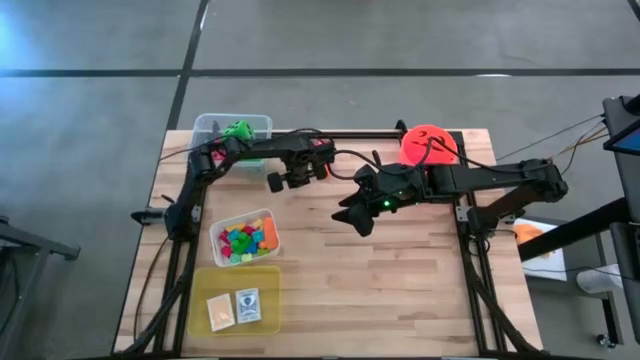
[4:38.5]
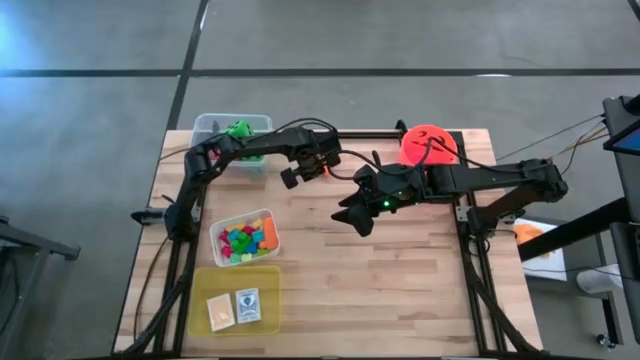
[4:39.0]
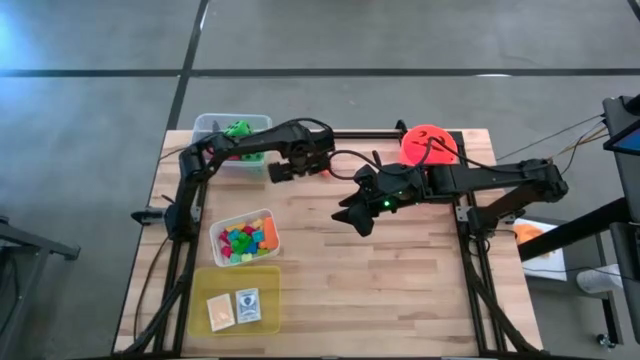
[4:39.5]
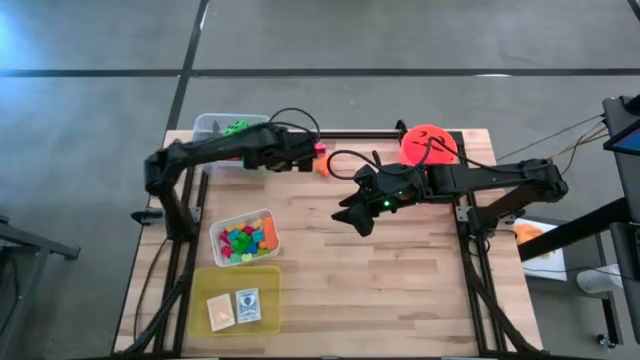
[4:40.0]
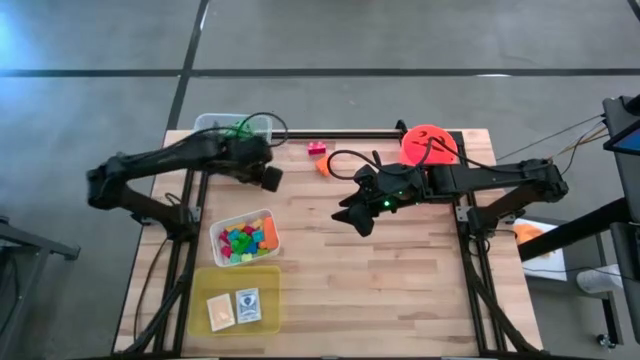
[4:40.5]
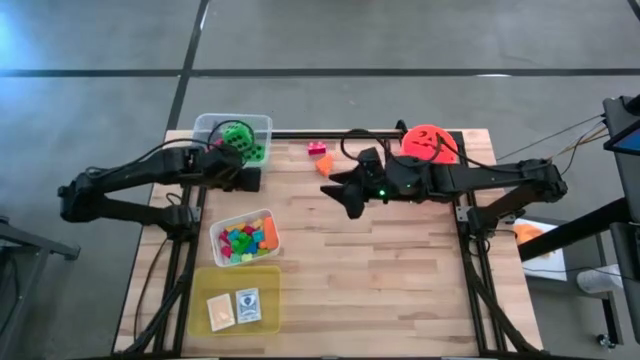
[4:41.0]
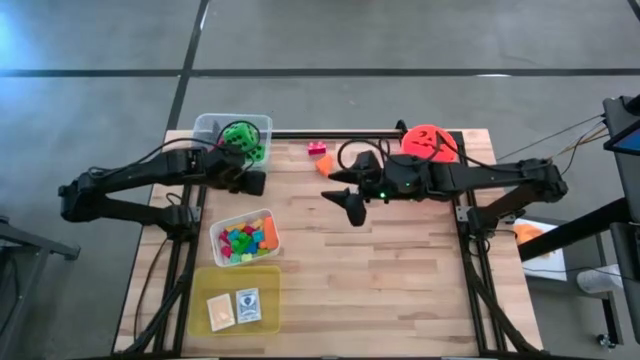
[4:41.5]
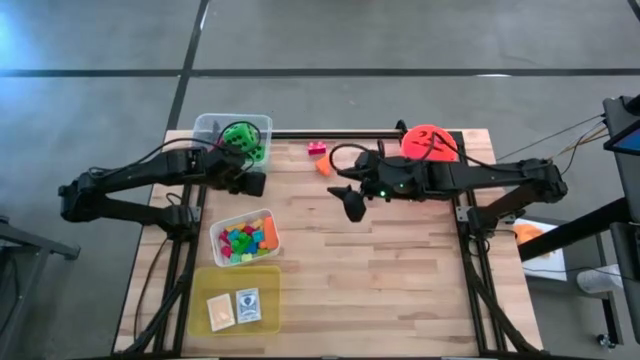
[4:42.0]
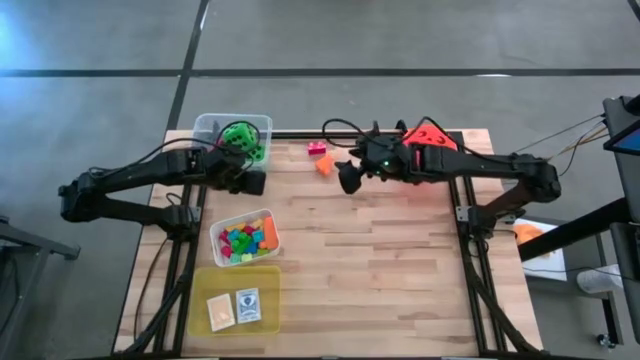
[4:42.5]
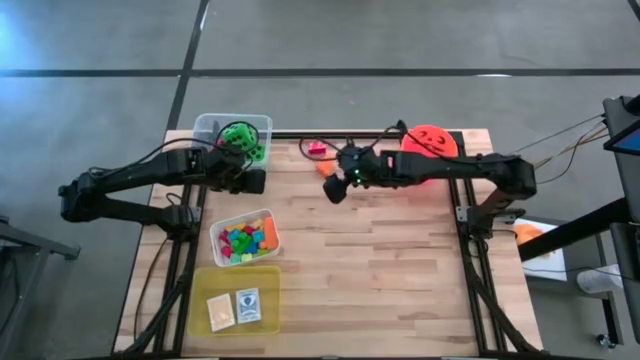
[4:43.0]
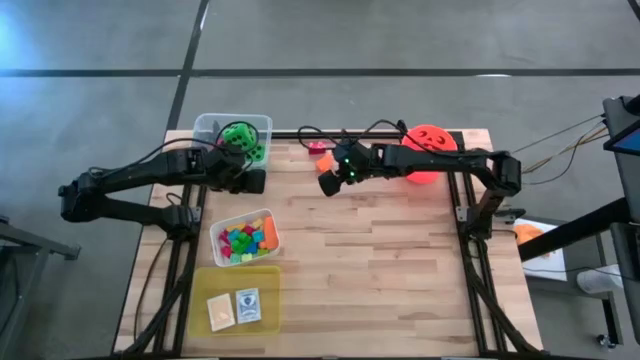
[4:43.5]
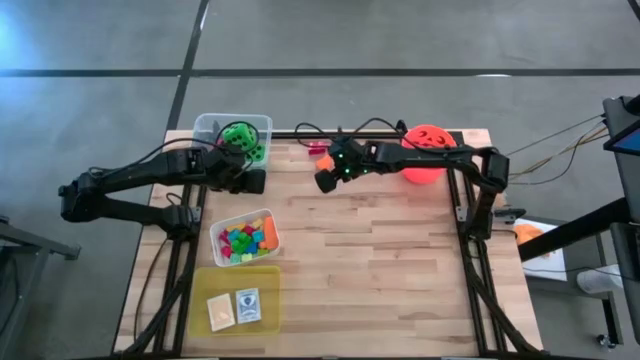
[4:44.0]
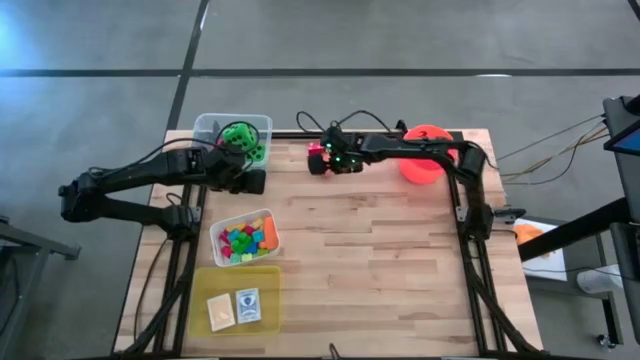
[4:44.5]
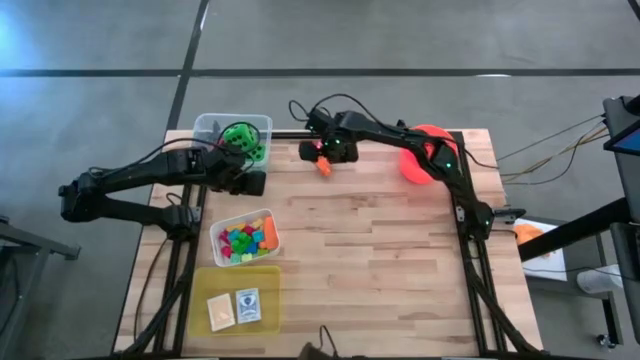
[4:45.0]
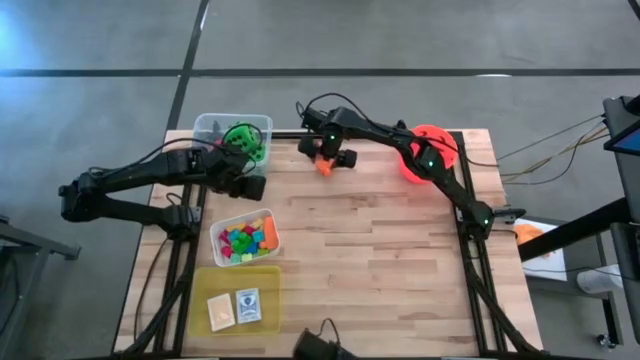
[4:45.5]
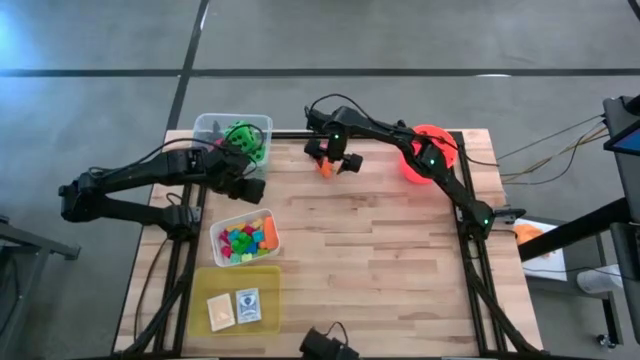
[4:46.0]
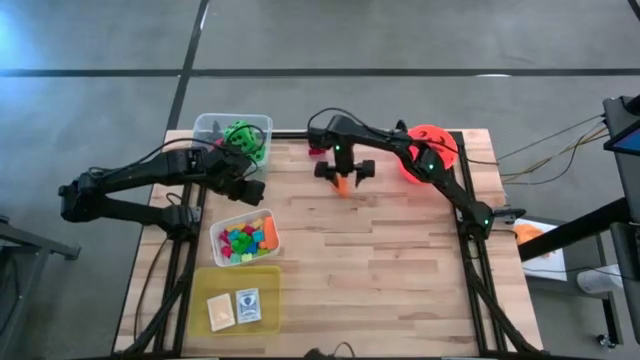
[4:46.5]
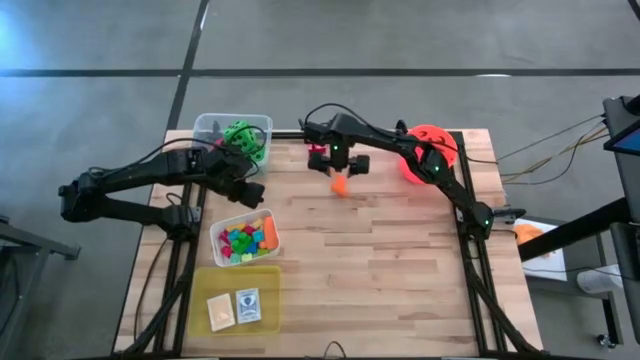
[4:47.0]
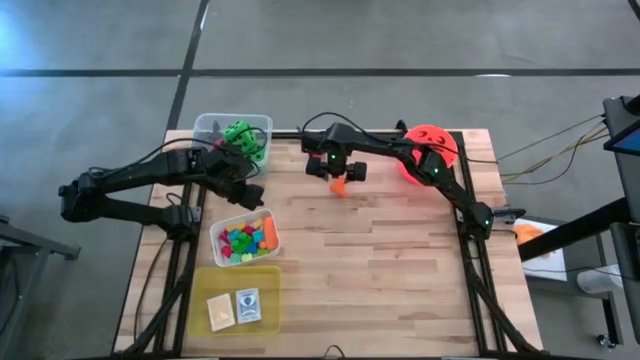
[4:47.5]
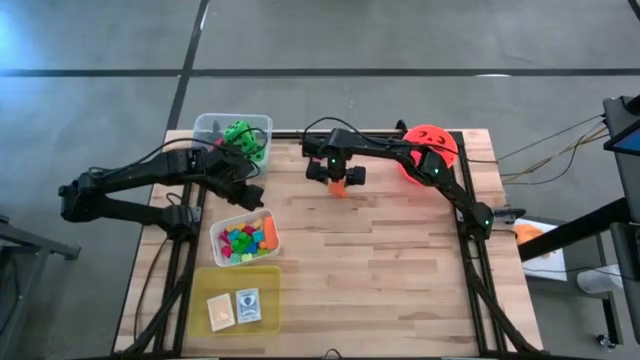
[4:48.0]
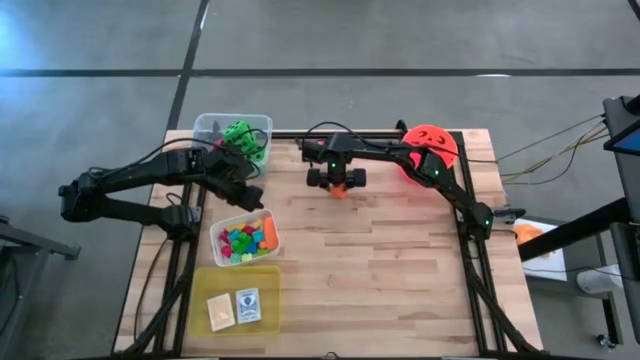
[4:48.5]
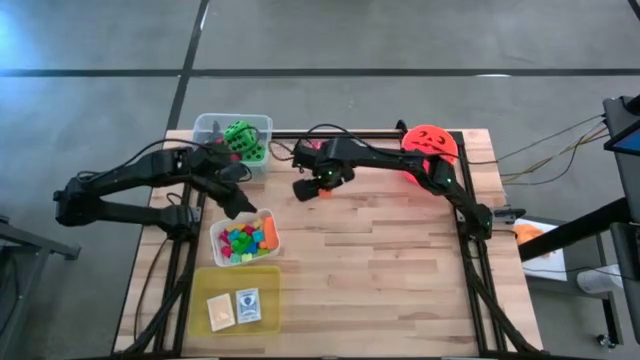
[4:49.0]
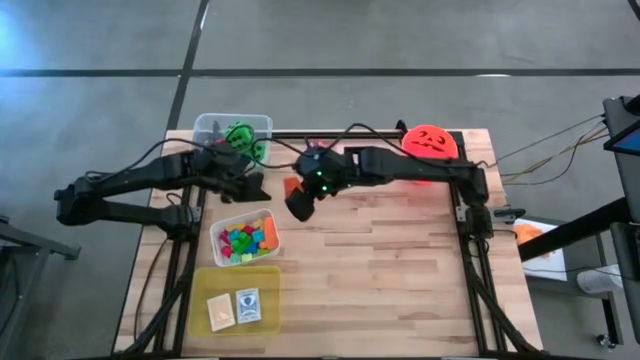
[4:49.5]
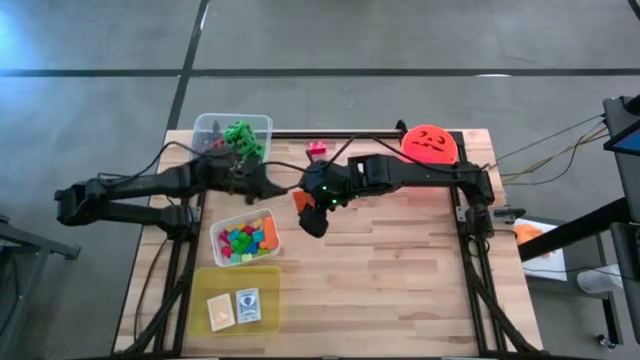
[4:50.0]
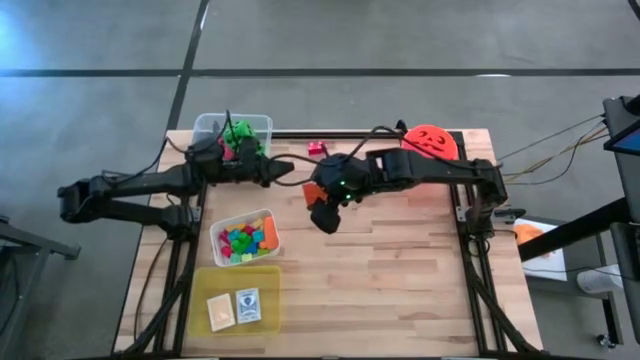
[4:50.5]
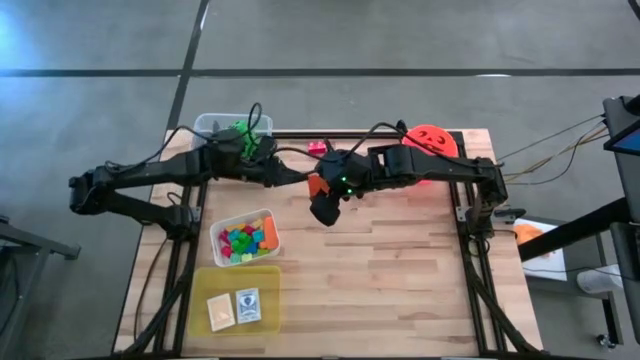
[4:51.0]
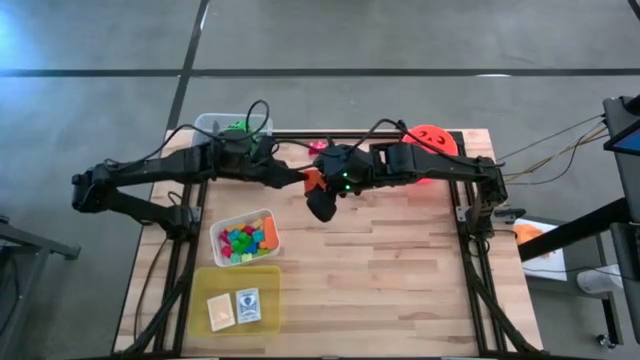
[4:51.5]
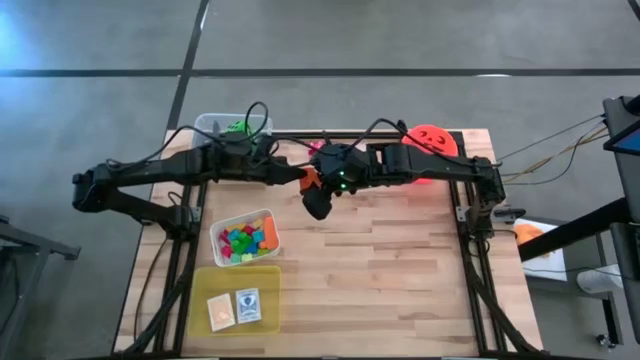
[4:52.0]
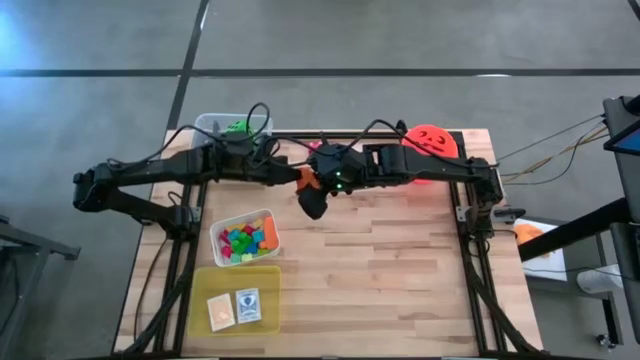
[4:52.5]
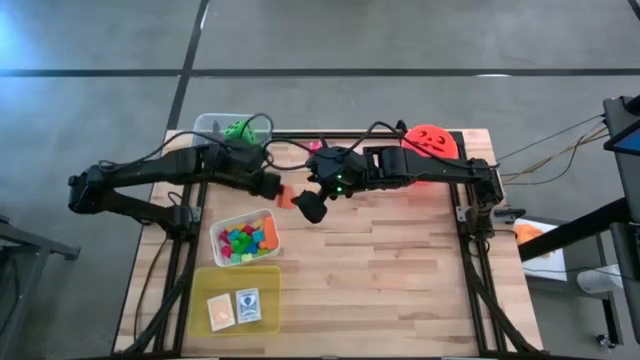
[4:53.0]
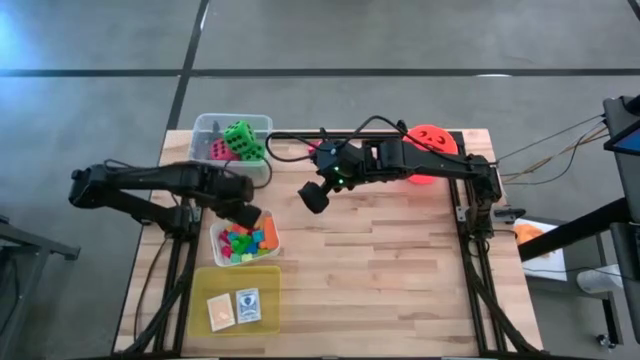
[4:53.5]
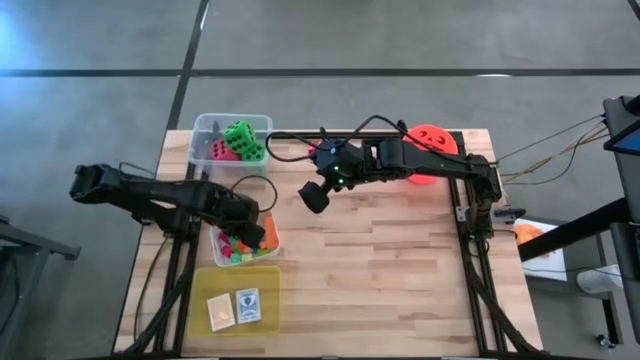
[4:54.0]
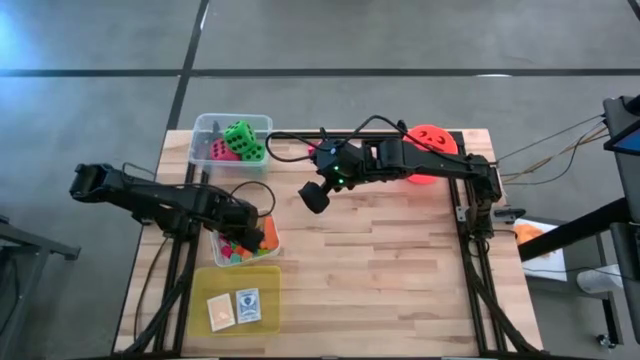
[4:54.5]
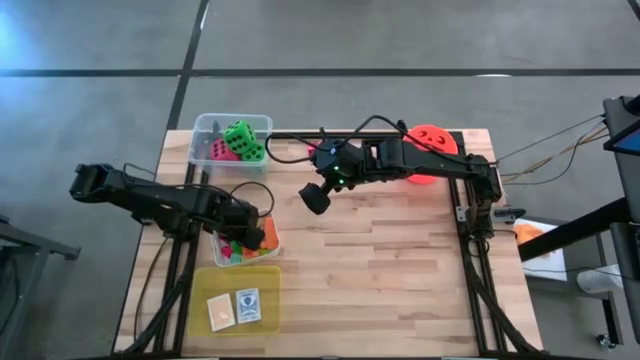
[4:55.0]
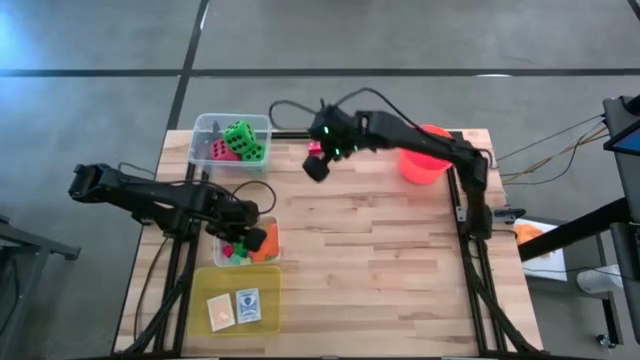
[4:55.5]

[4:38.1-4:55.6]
Task: Pick & Place Toys
Put the orange game piece into the white bin

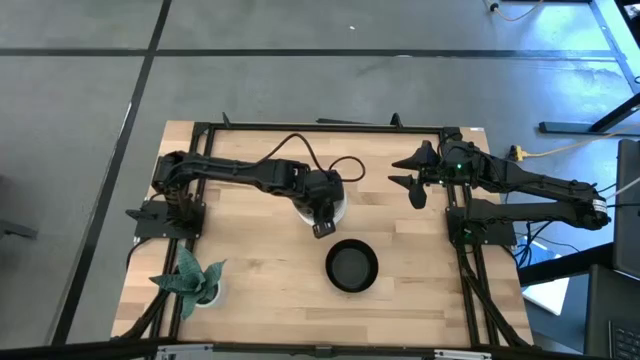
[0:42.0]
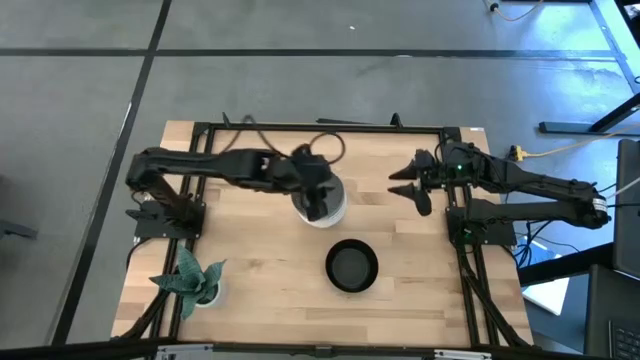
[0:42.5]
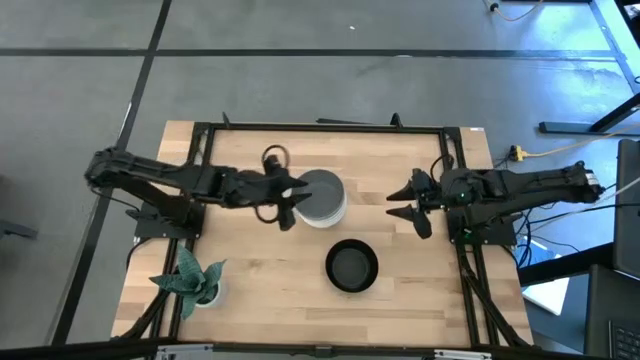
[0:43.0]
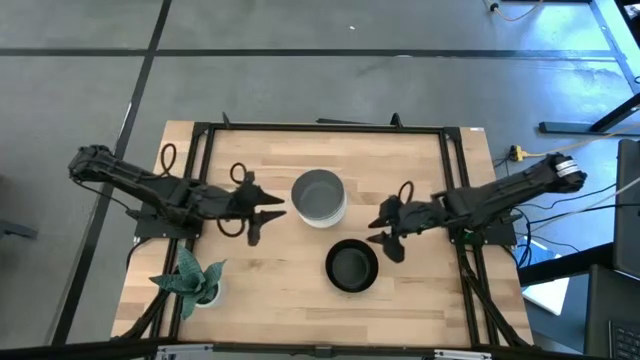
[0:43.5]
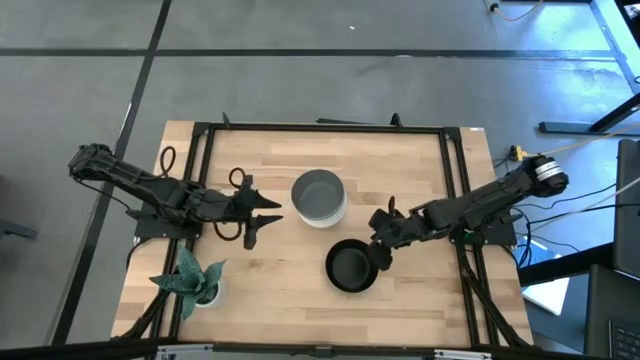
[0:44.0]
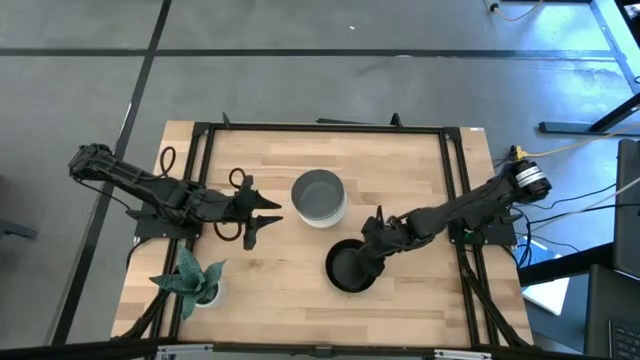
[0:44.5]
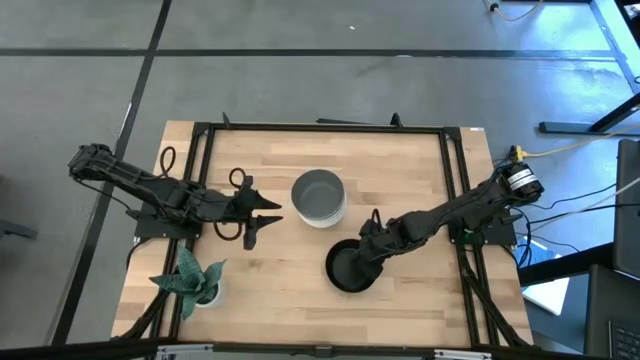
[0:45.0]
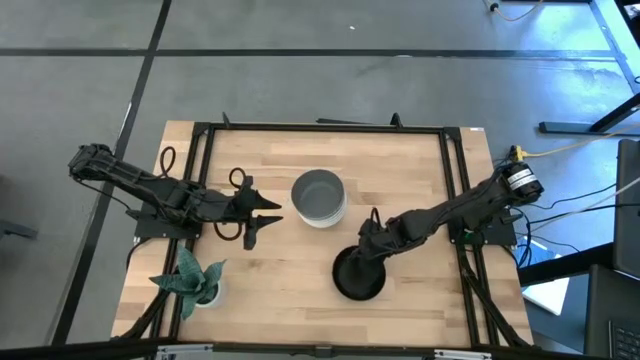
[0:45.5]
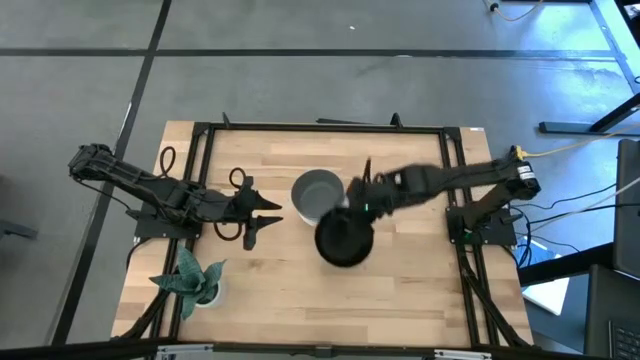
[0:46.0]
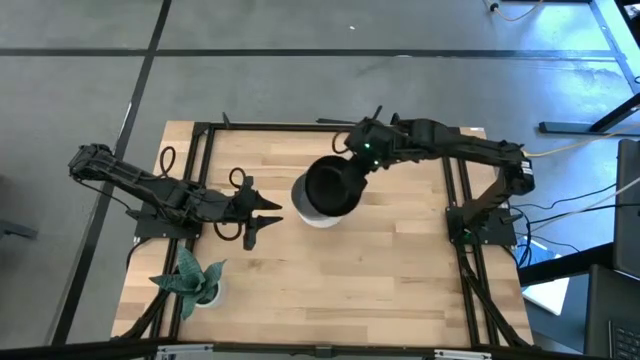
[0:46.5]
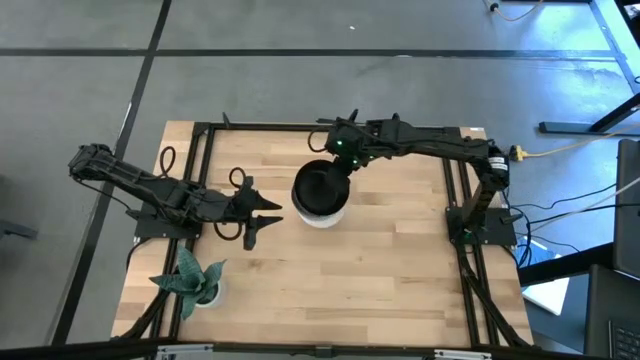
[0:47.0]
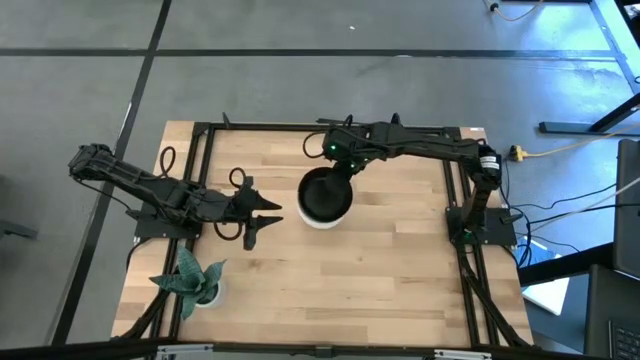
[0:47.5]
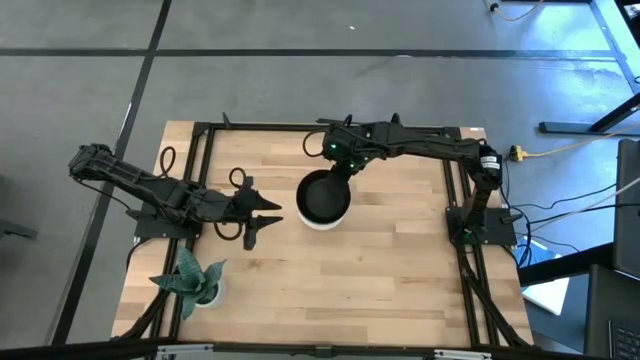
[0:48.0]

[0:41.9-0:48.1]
Task: Nest bowls inside each other
Stack the black bowl on top of the gray bowl
